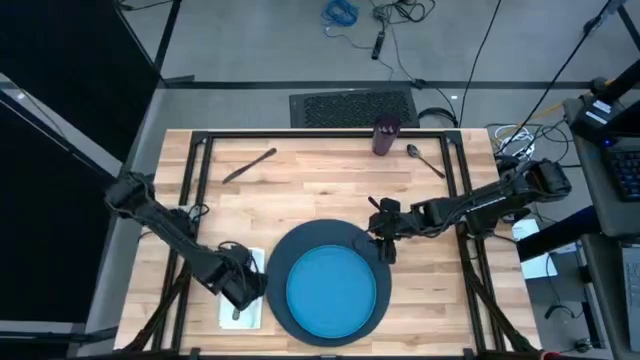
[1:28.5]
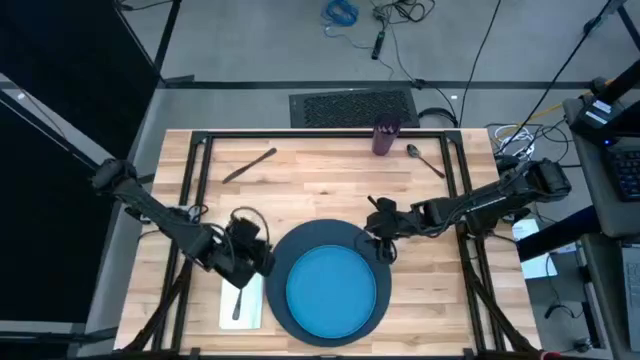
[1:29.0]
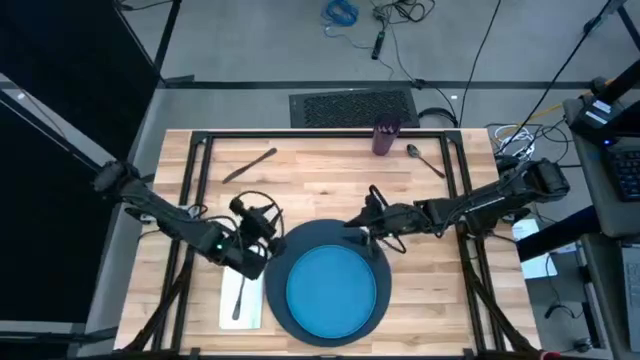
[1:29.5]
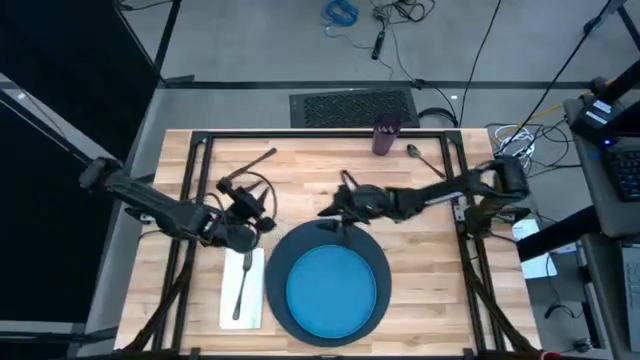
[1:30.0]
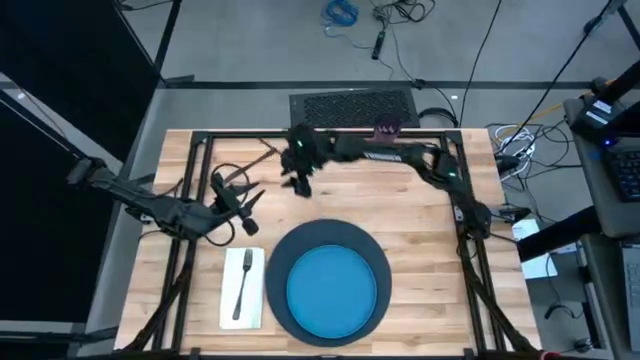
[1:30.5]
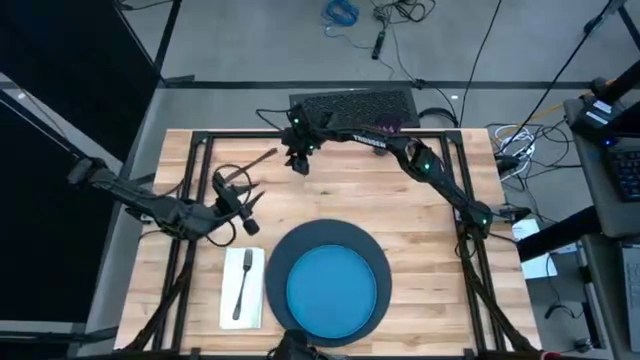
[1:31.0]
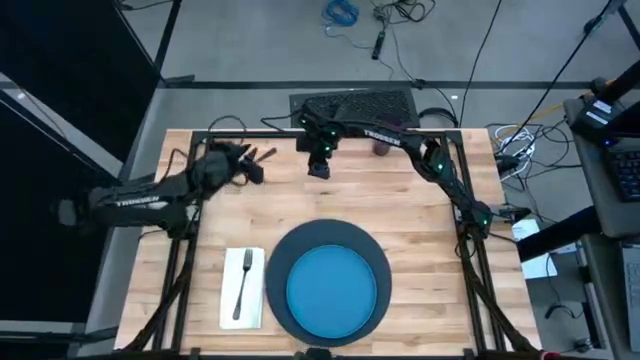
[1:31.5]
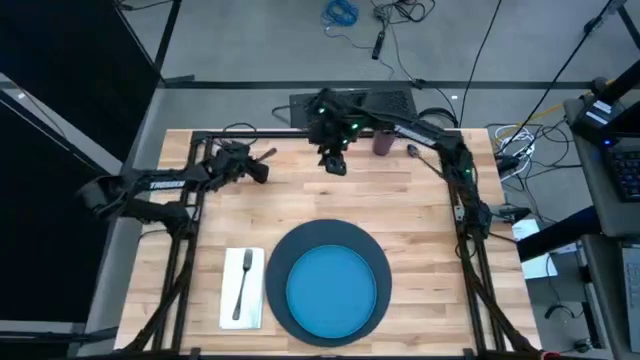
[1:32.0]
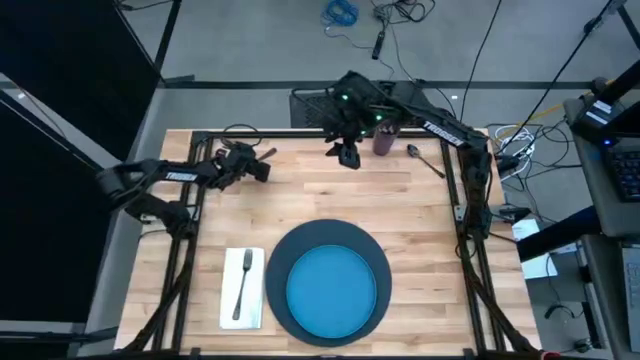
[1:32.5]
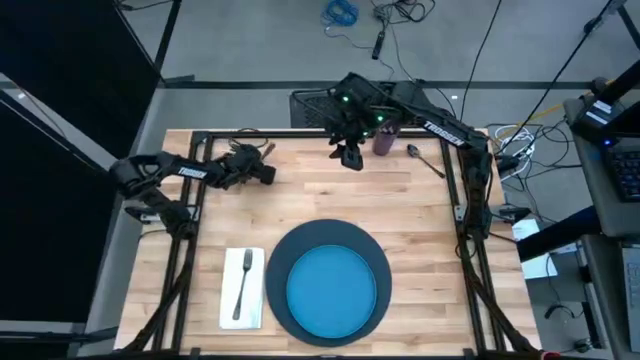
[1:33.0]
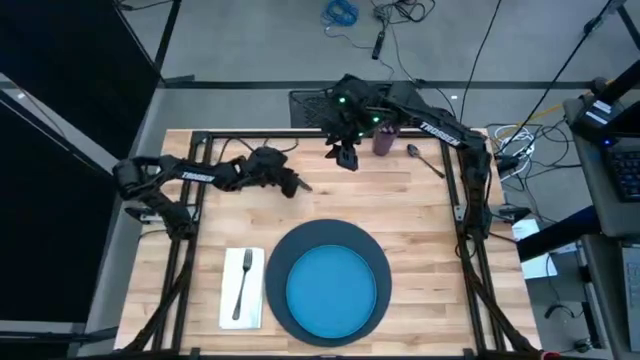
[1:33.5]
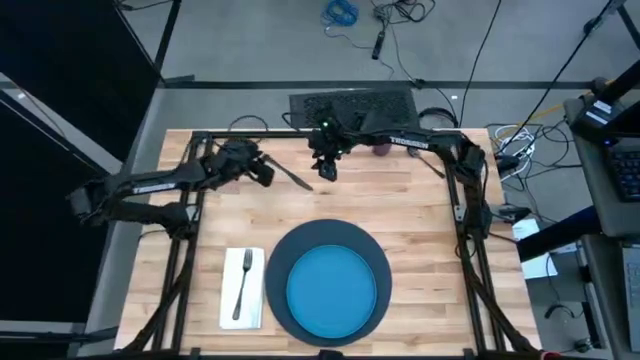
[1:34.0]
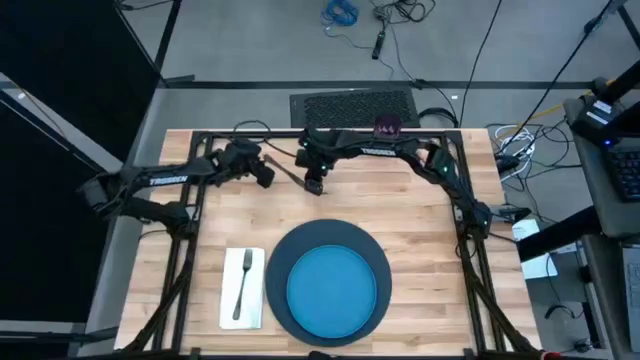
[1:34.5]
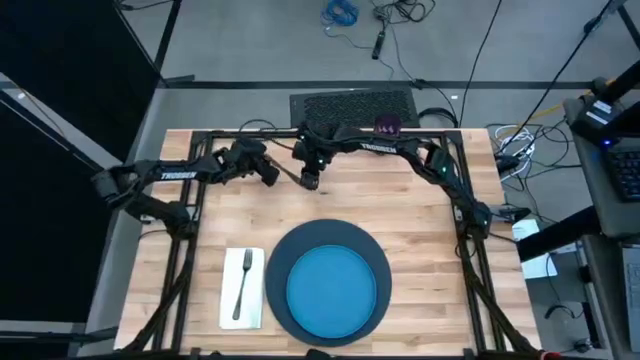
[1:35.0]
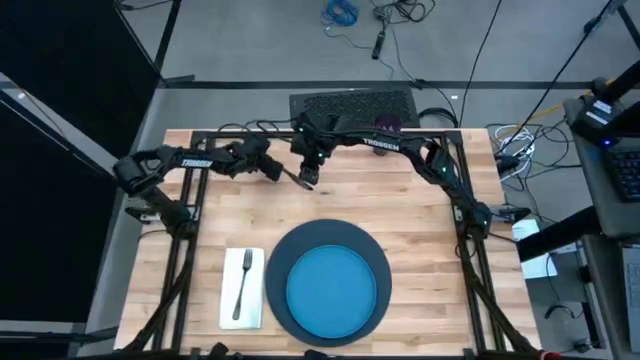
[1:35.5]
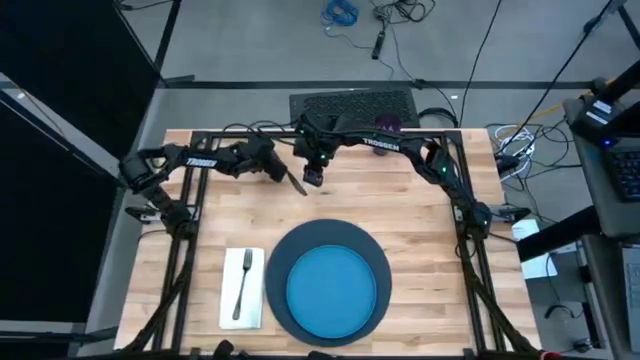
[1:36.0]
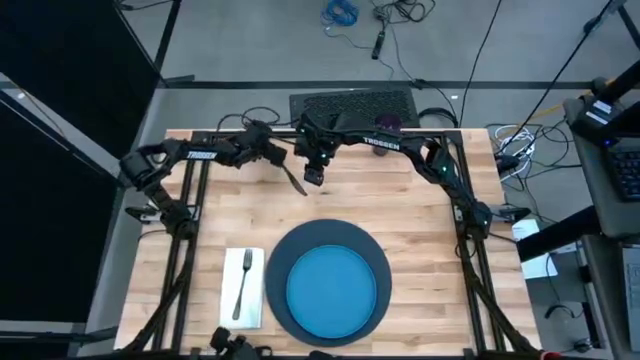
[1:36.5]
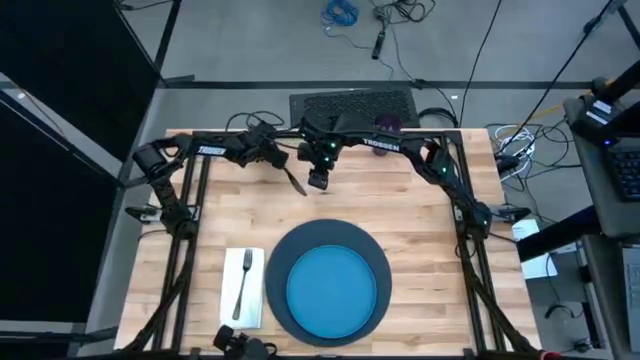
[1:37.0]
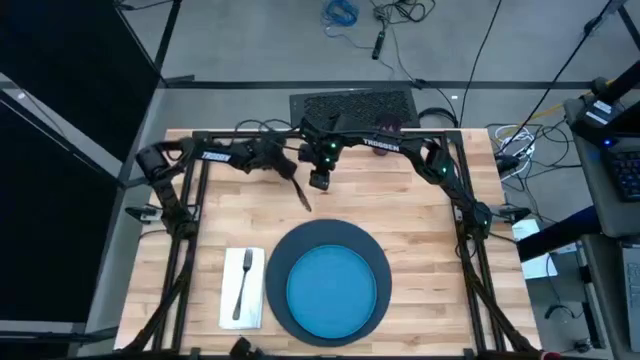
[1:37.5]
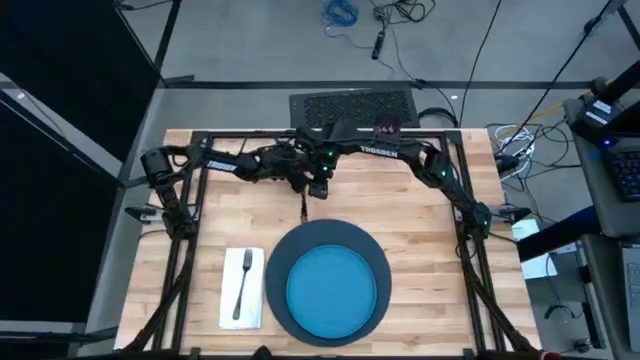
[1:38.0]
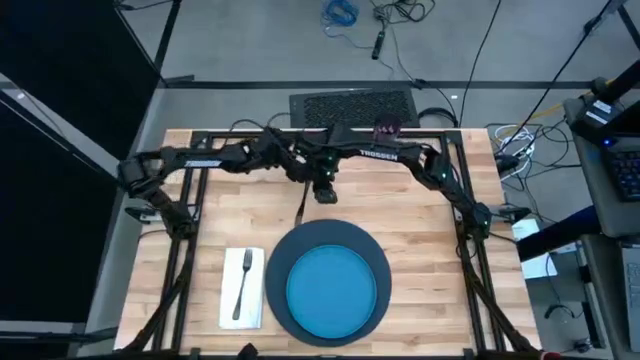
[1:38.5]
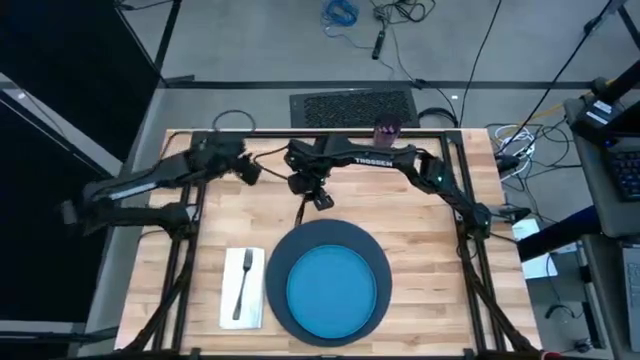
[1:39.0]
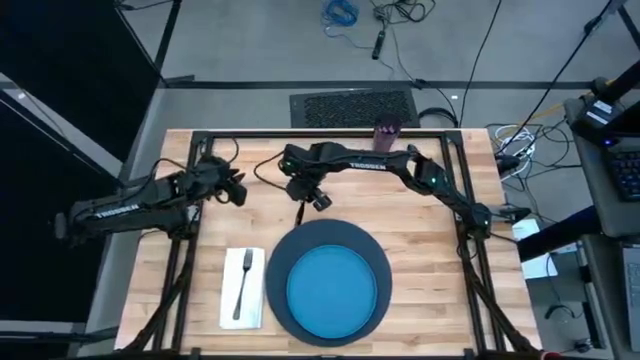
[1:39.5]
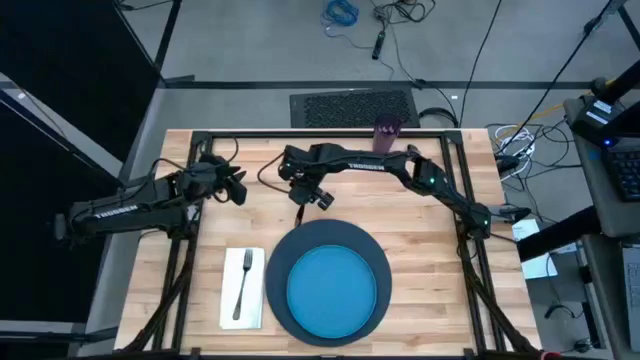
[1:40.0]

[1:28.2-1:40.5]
Task: Set table place
Move the black knife to the right of the blue table mat on the table

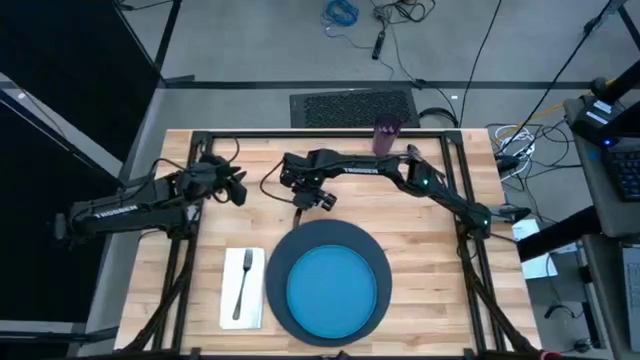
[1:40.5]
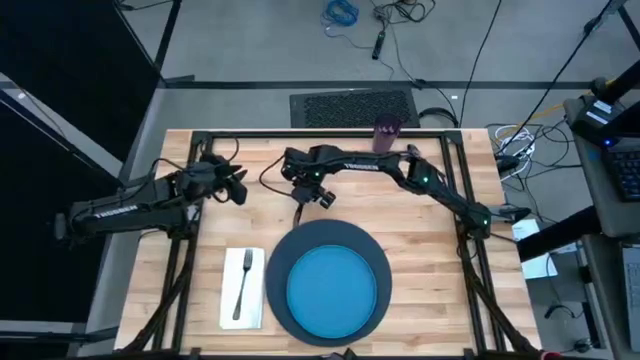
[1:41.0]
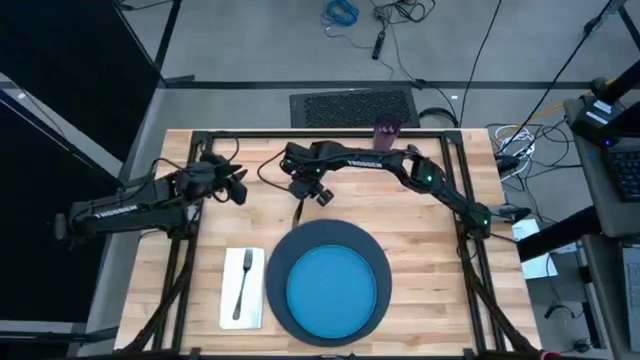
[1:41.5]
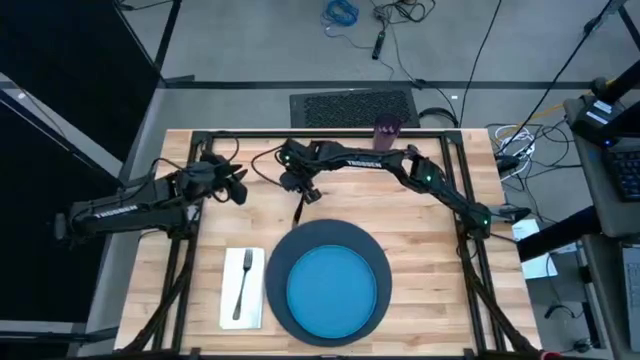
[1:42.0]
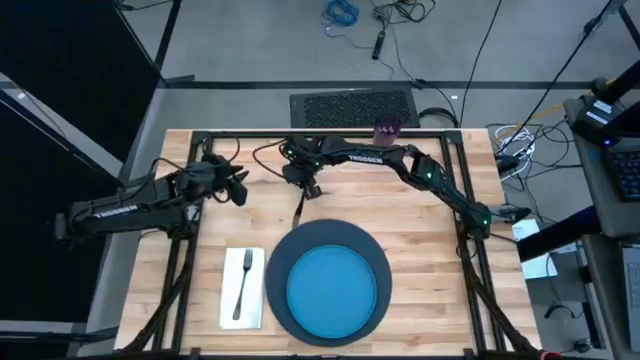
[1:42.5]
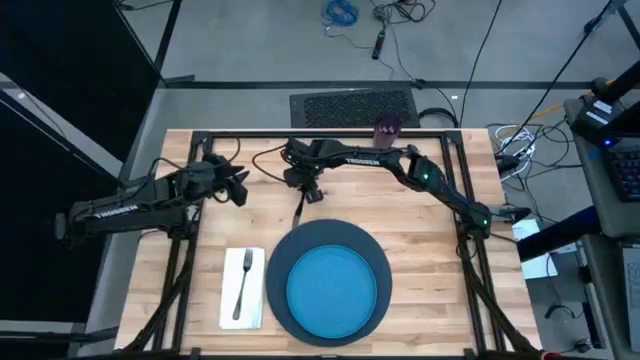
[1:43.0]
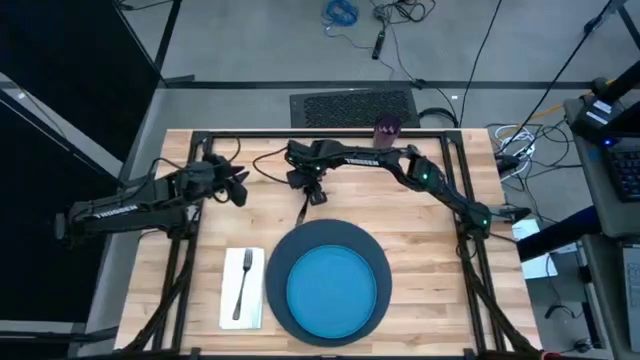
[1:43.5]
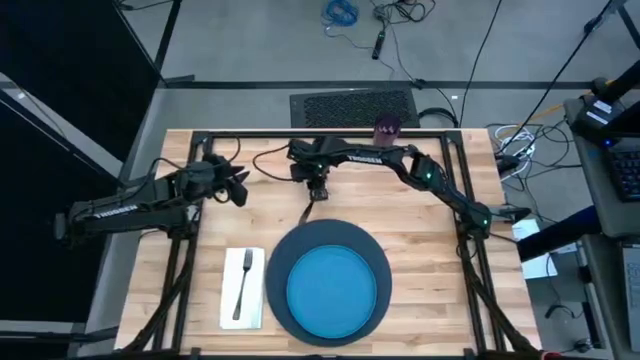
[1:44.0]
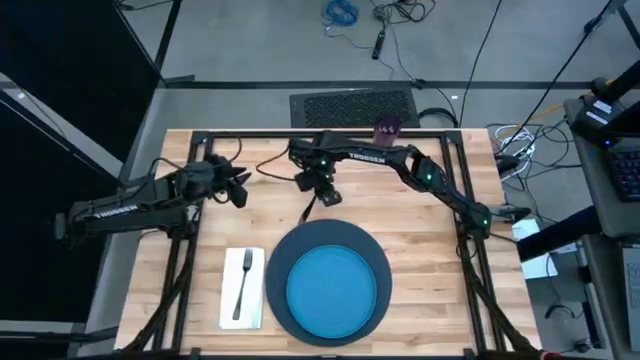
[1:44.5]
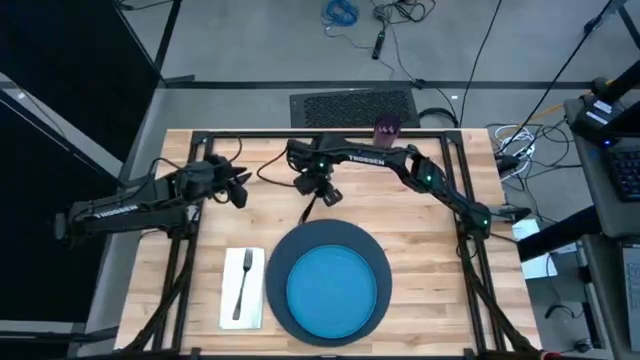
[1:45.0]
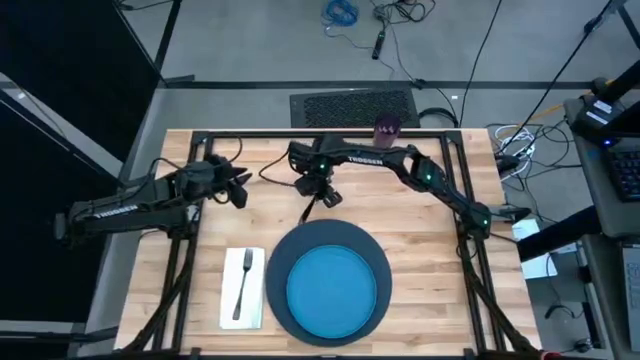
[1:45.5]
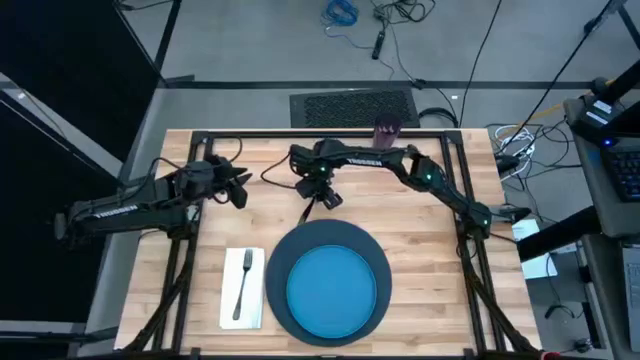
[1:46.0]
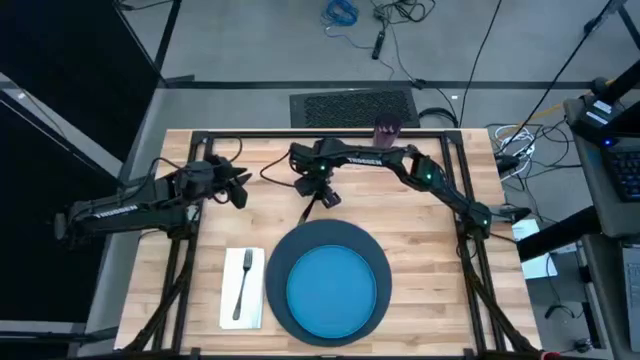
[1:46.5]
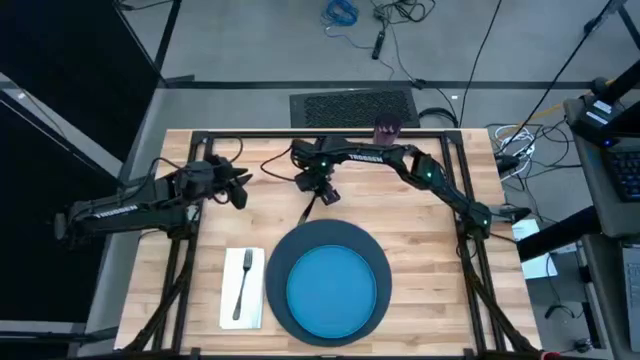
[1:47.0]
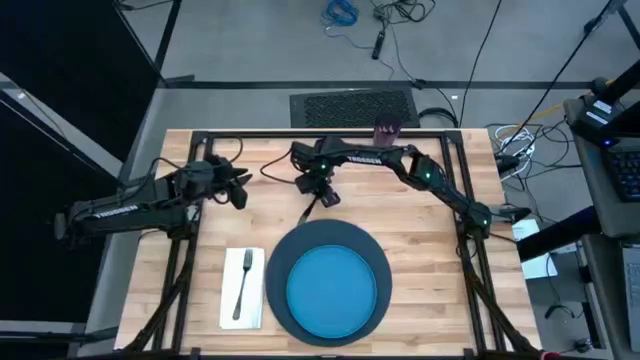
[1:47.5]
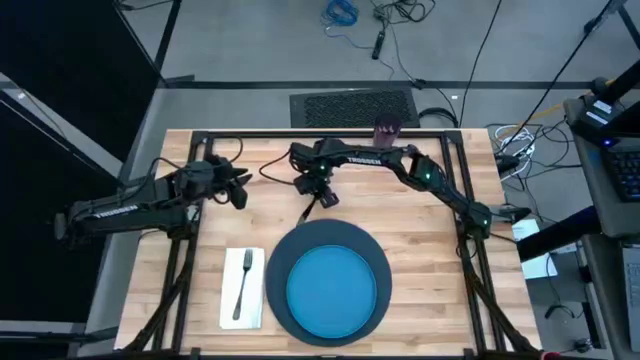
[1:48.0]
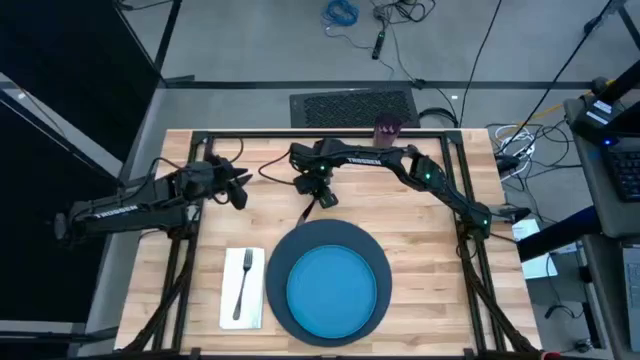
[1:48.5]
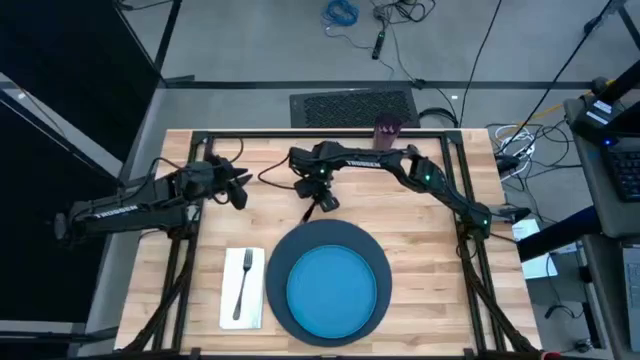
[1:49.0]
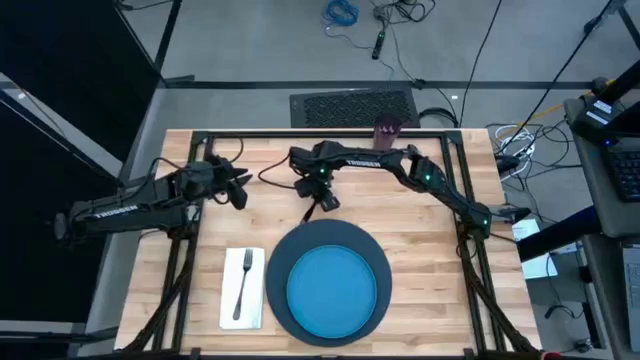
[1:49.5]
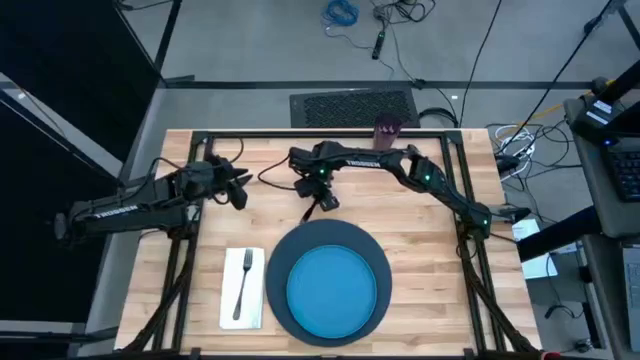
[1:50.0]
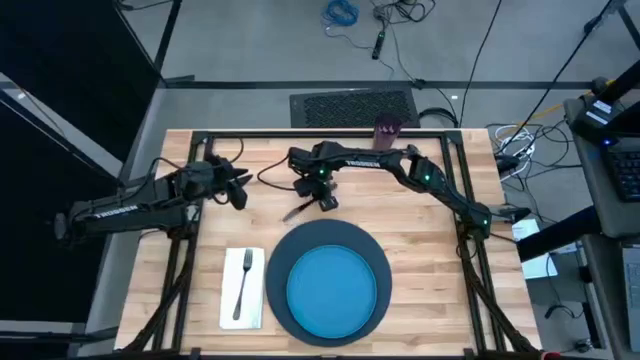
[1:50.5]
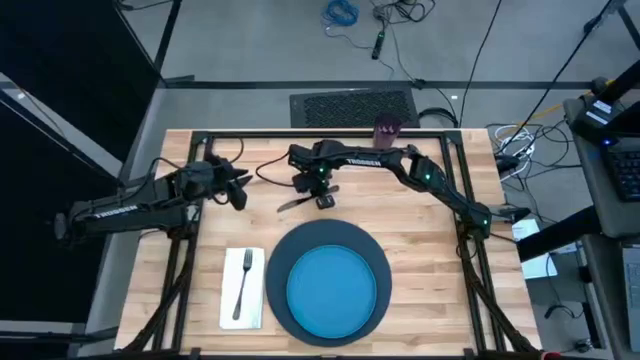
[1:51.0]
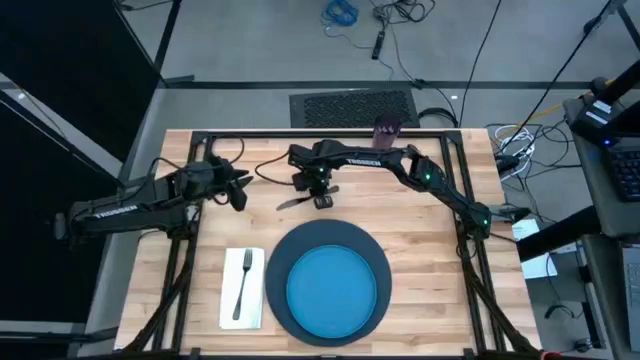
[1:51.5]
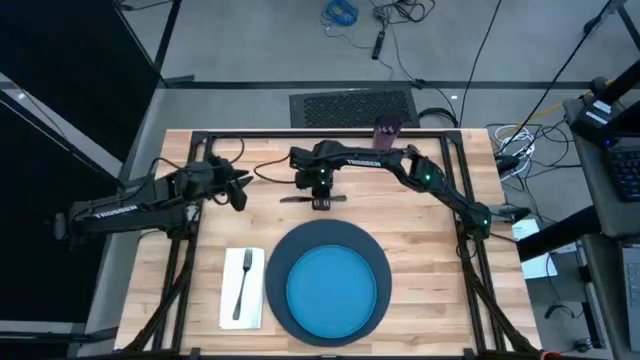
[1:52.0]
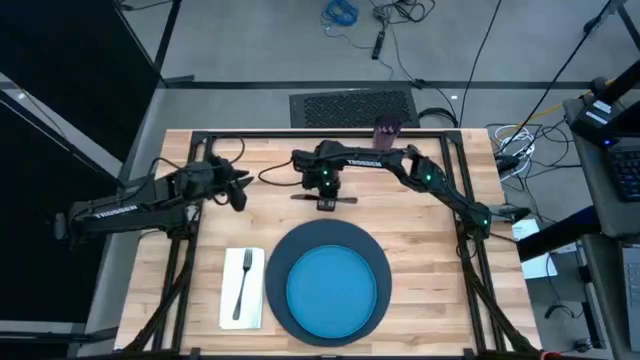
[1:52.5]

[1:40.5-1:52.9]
Move the black knife to the right of the blue table mat on the table
